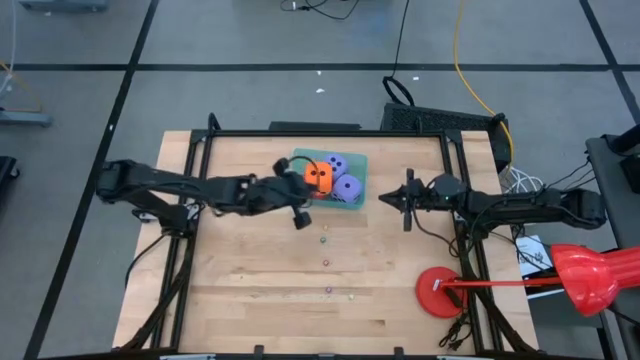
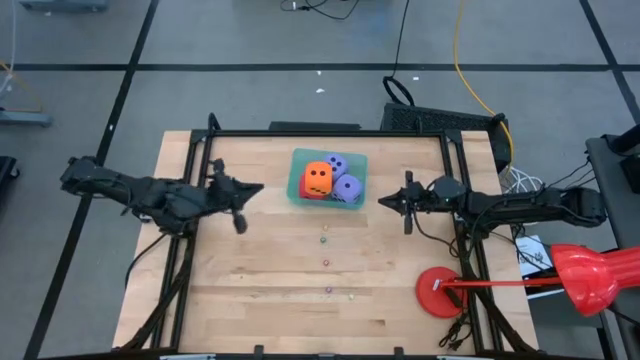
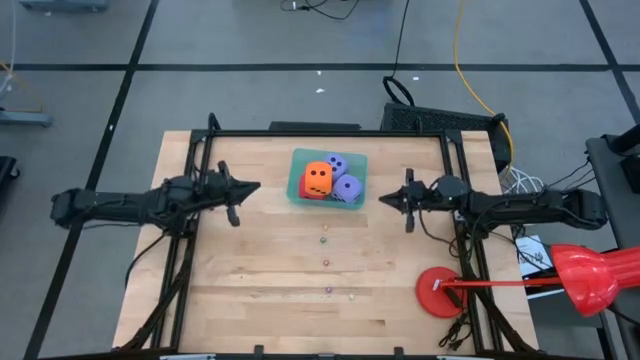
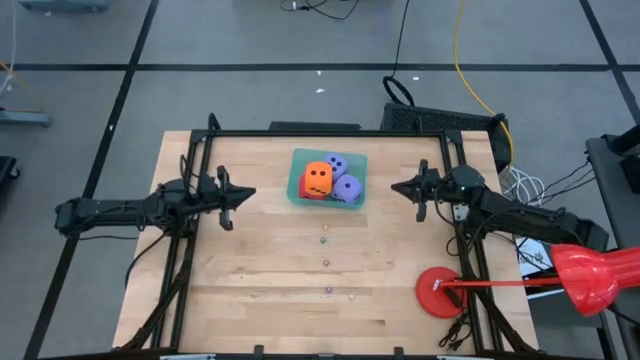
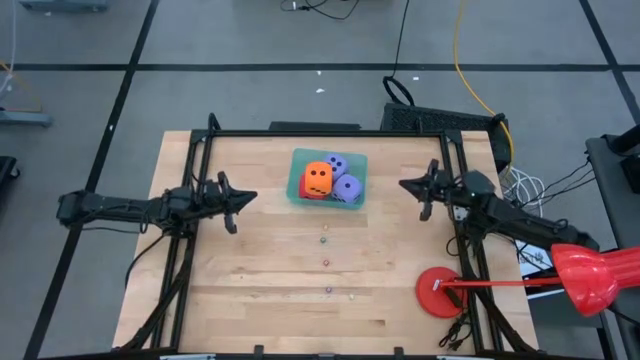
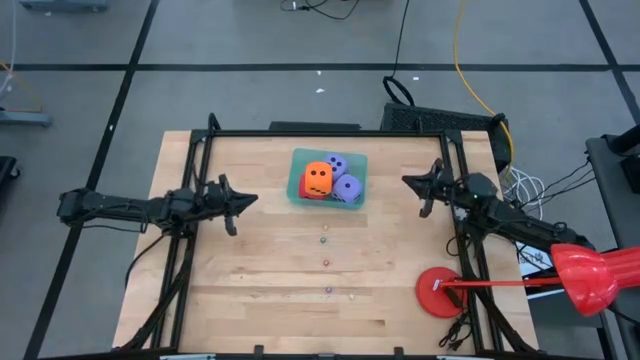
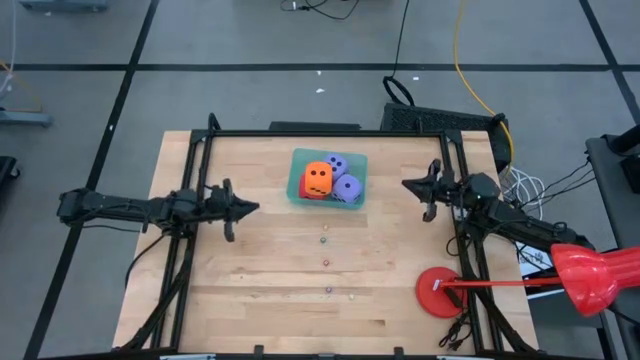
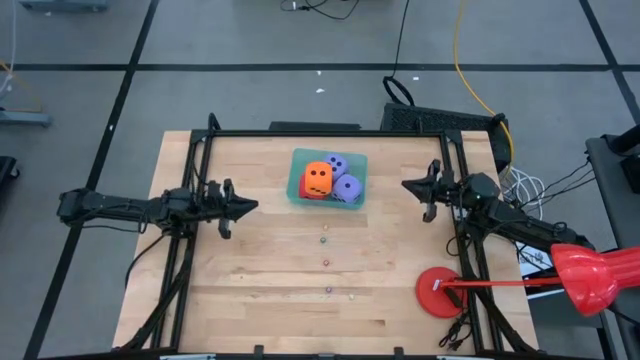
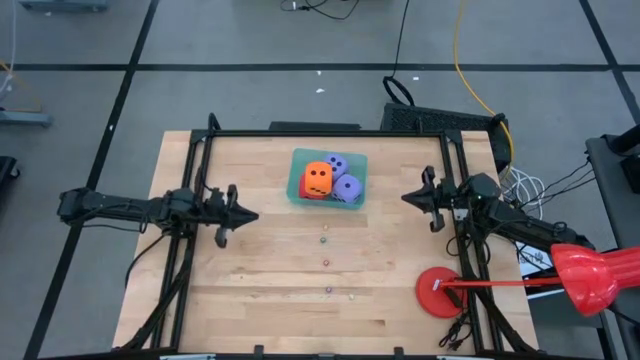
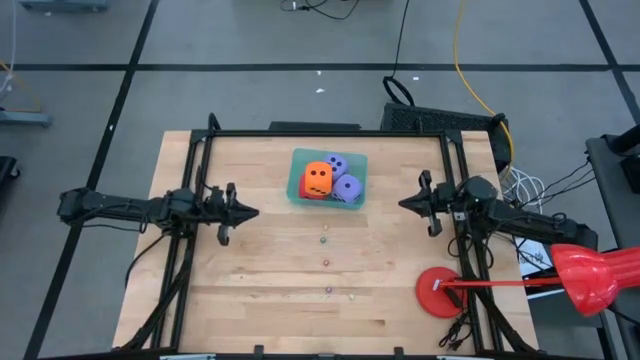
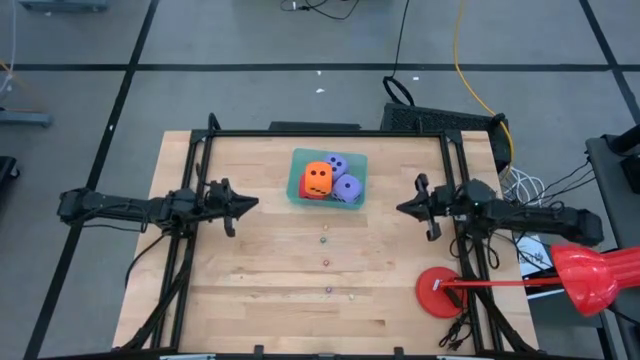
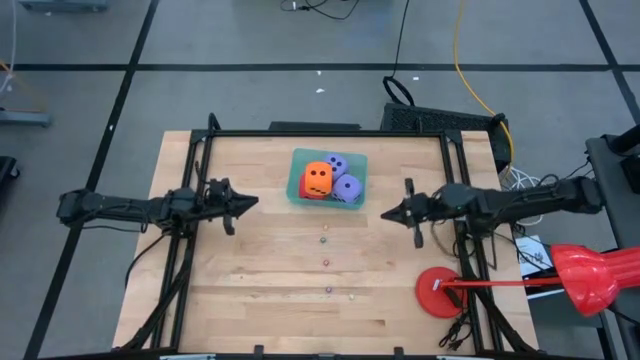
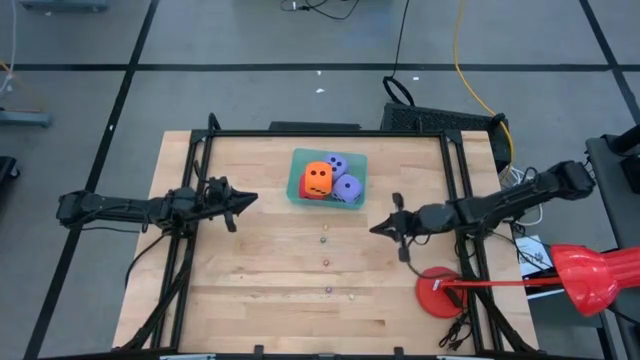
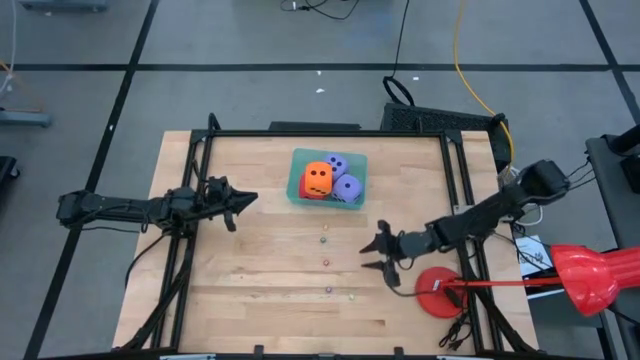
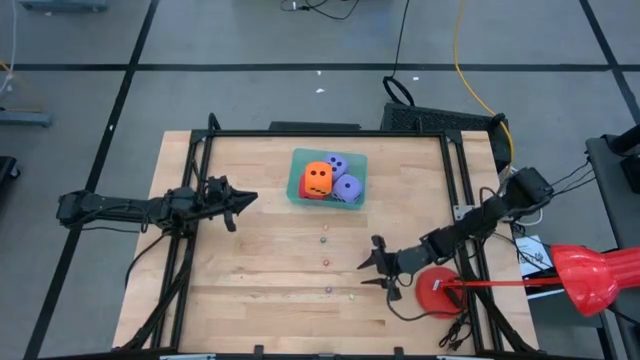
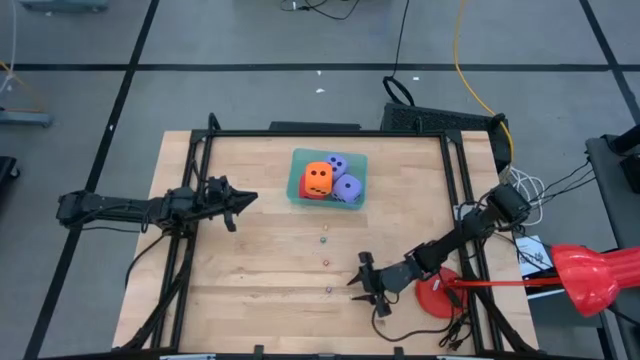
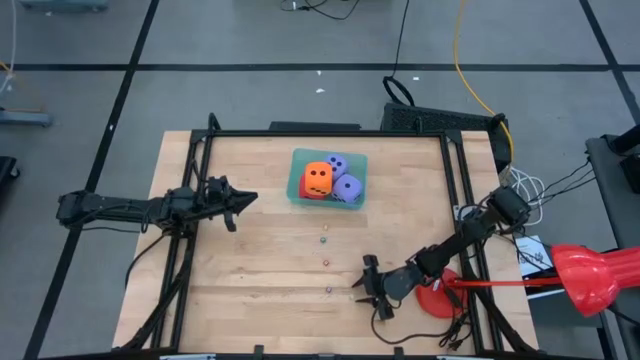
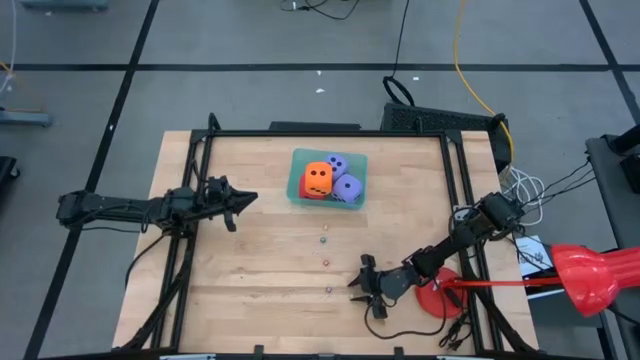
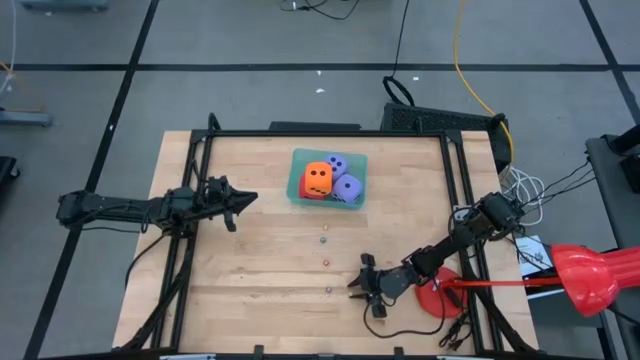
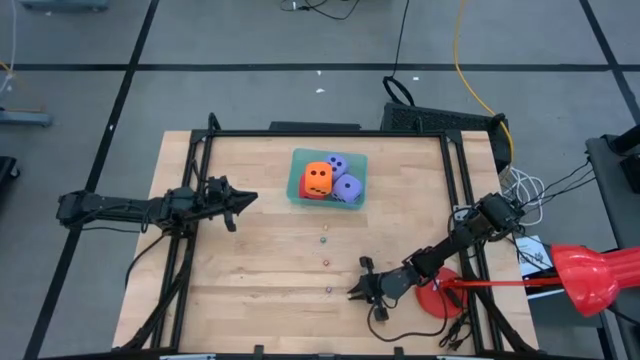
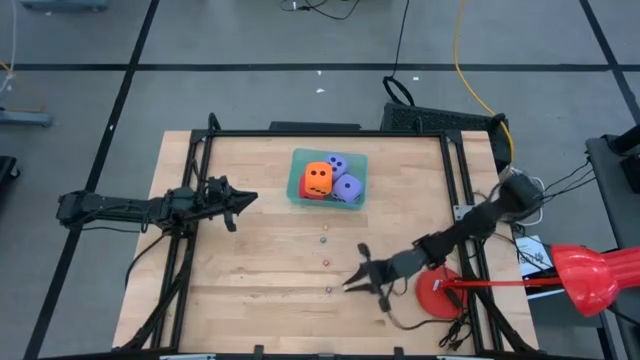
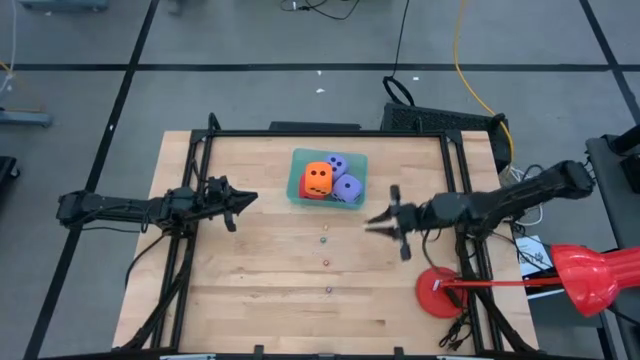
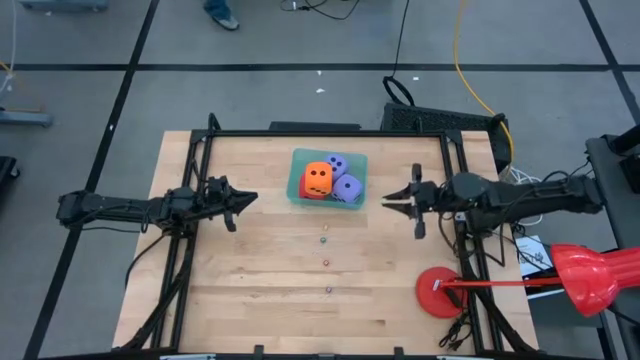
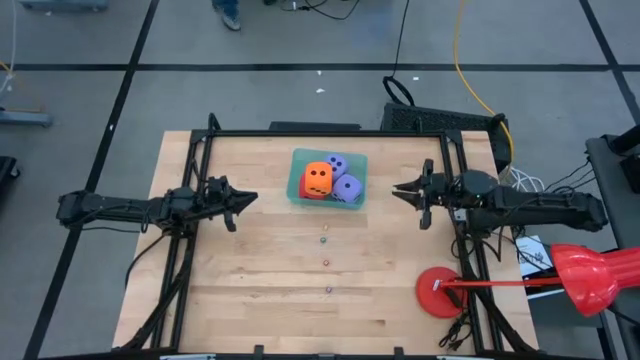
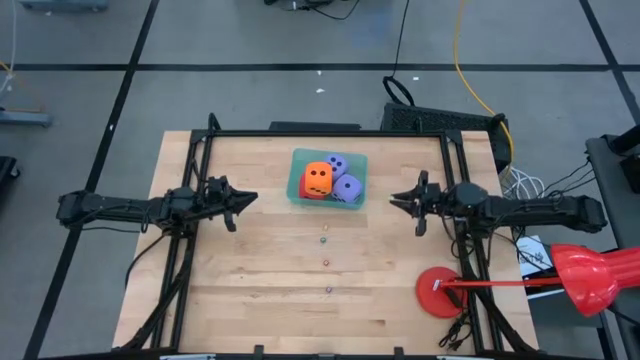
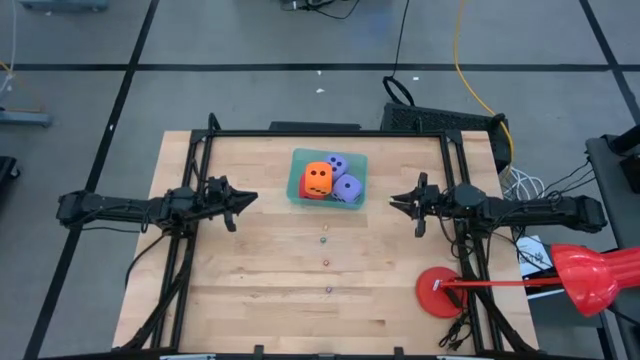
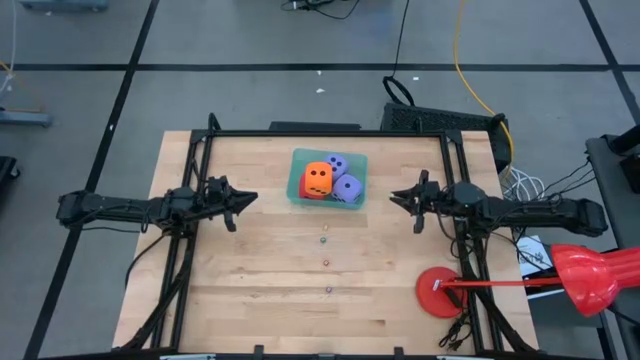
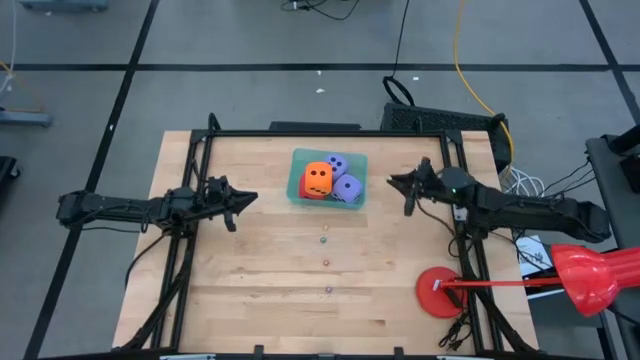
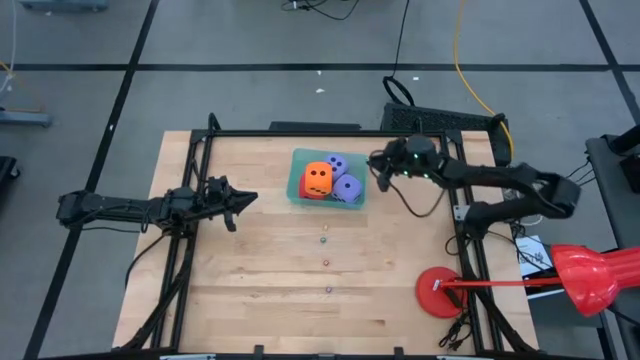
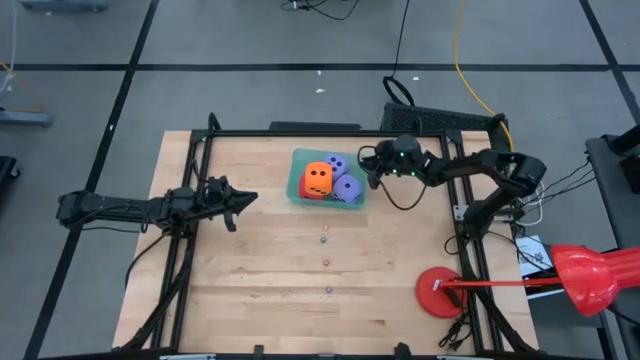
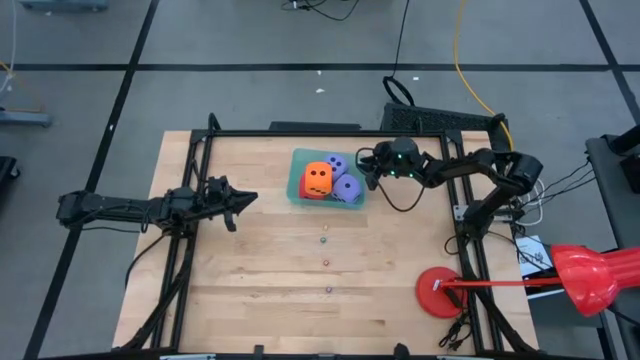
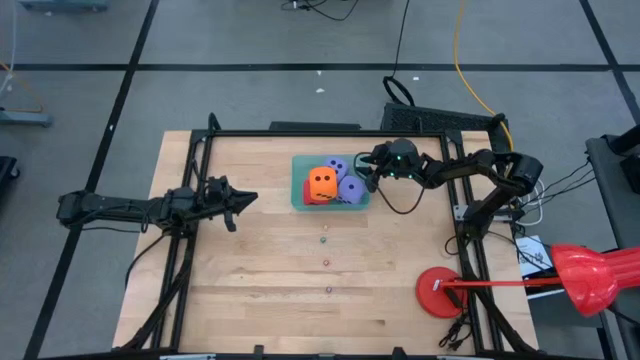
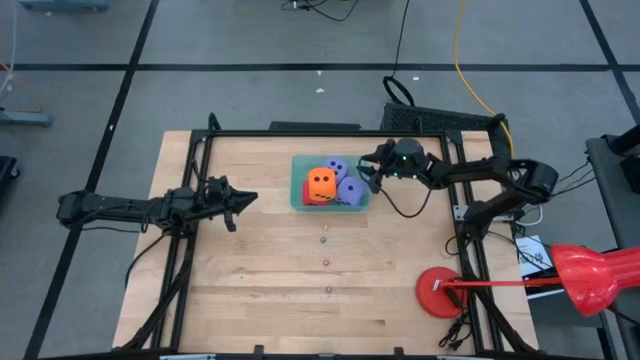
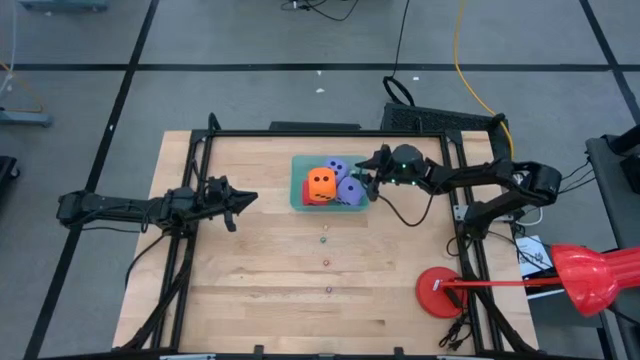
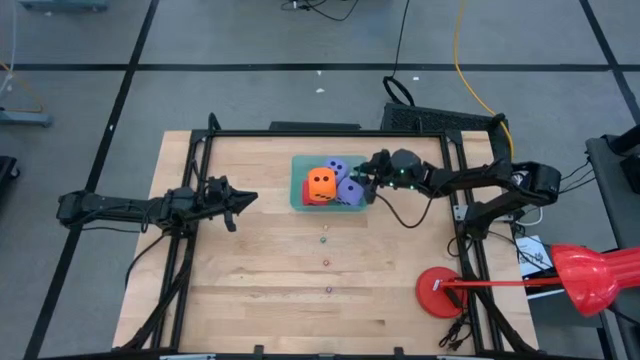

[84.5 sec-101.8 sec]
Task: Pick & Place Dice
Put the small light green dice into the blue bin

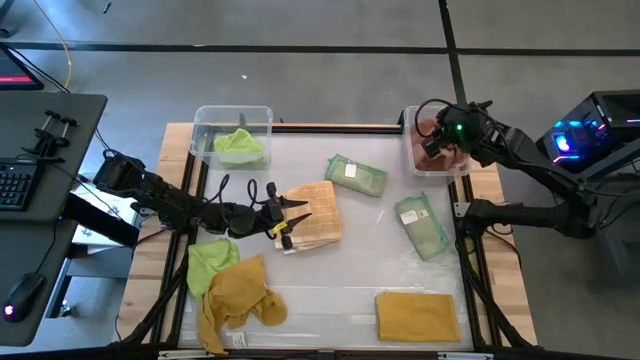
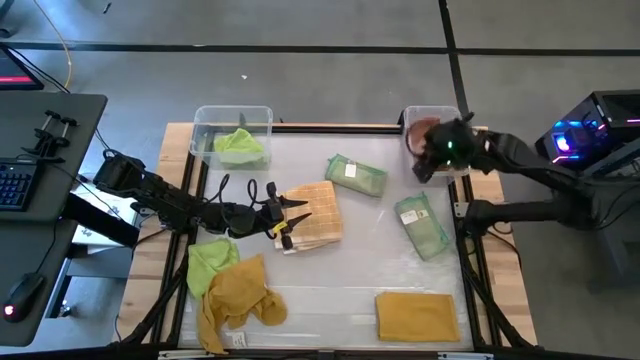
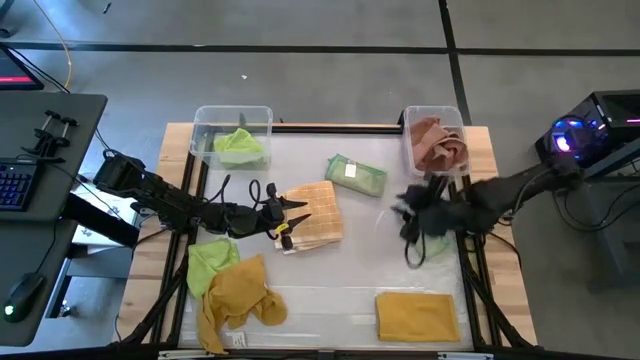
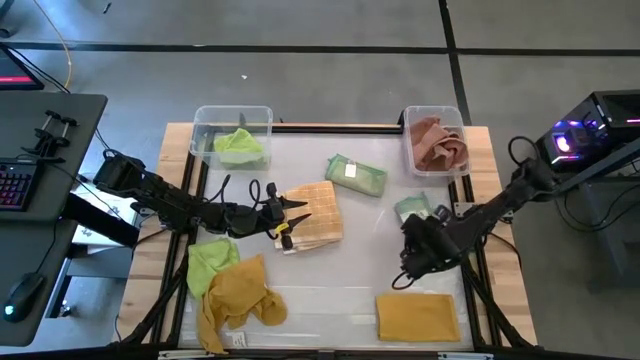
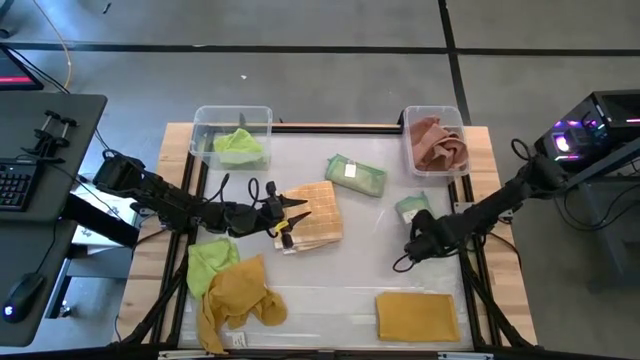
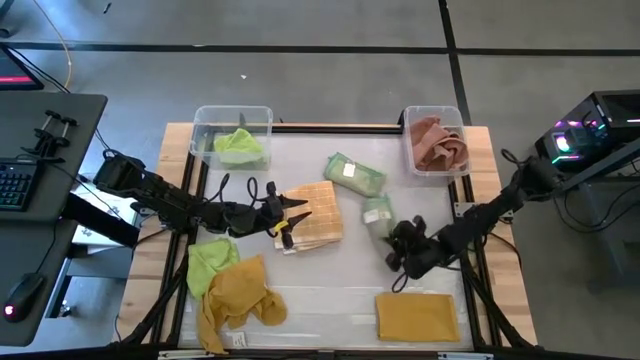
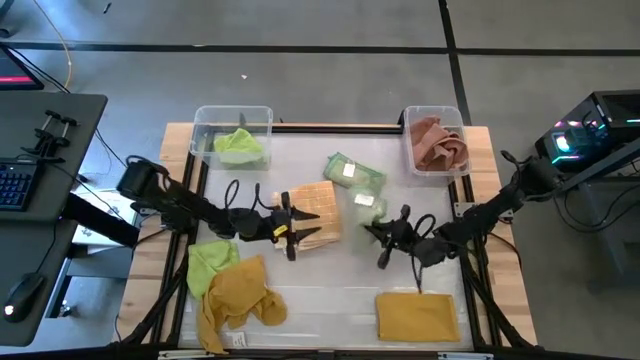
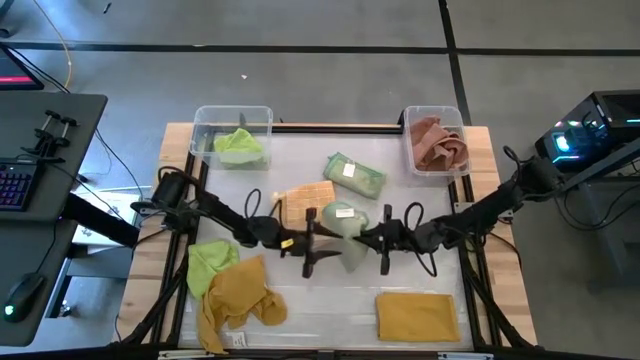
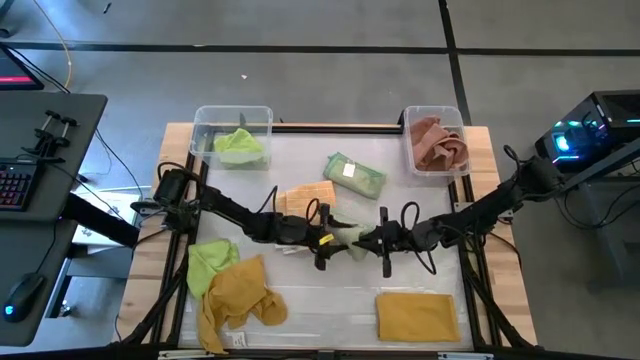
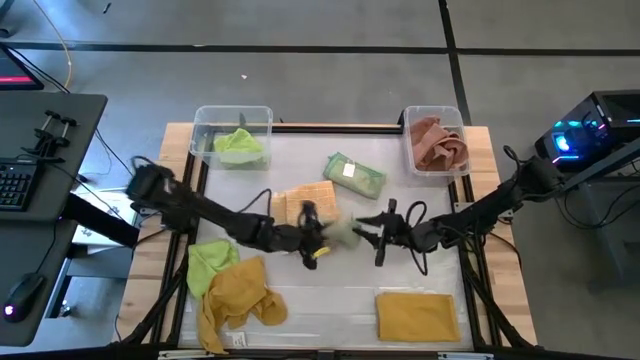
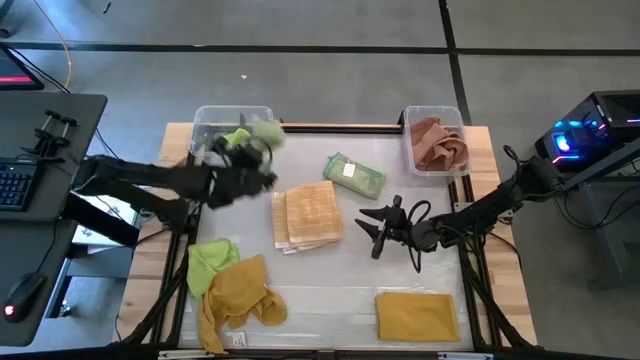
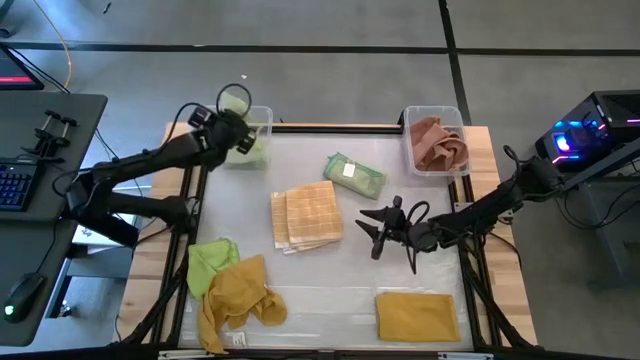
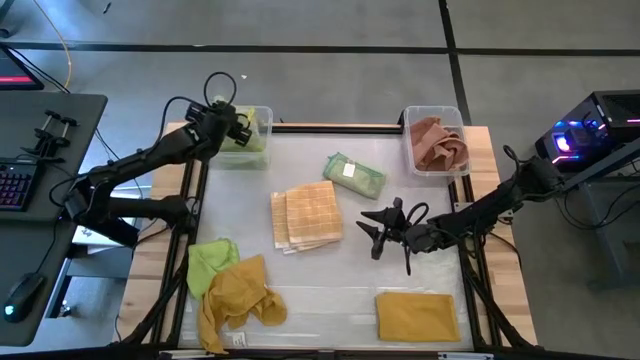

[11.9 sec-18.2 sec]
Task: Sort towels by color in basket
Put the right green microfiber towel into the left transparent bin
